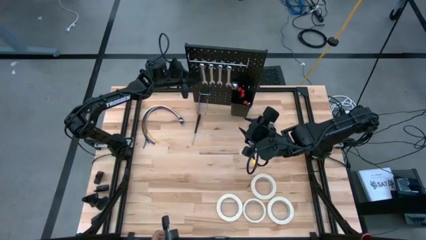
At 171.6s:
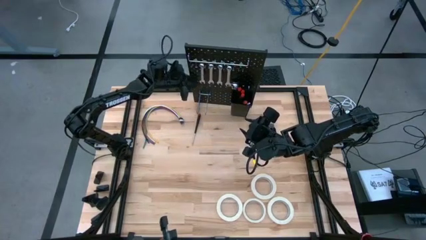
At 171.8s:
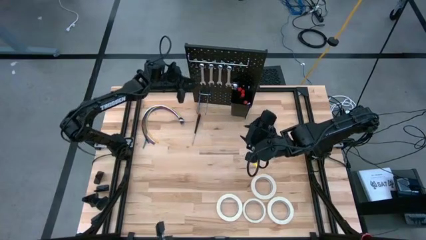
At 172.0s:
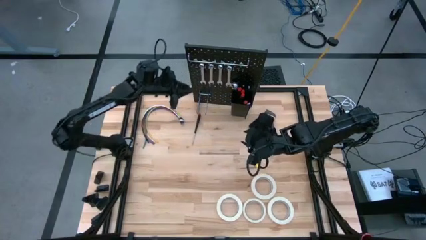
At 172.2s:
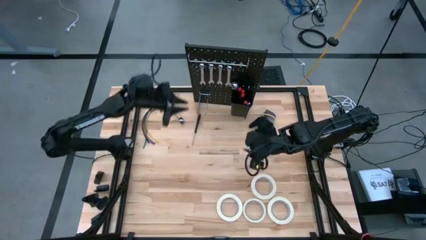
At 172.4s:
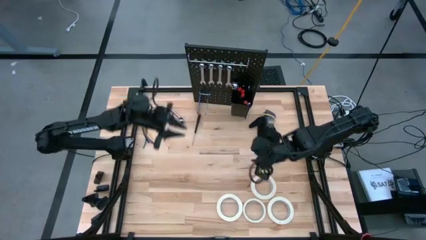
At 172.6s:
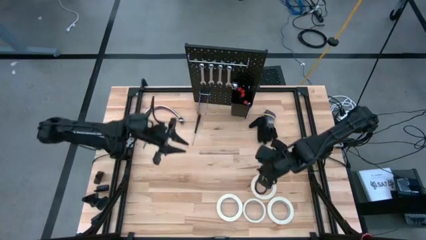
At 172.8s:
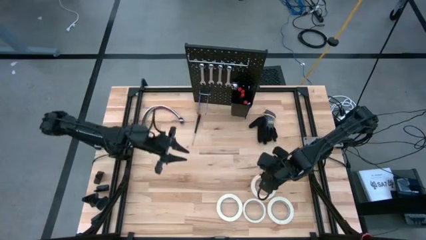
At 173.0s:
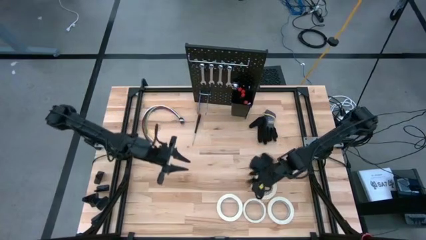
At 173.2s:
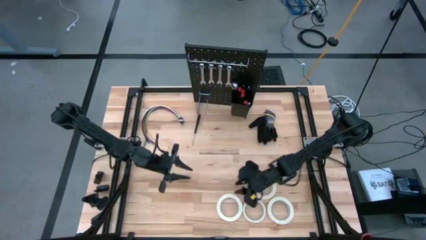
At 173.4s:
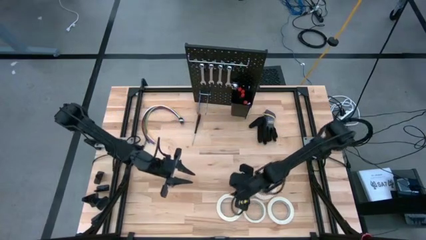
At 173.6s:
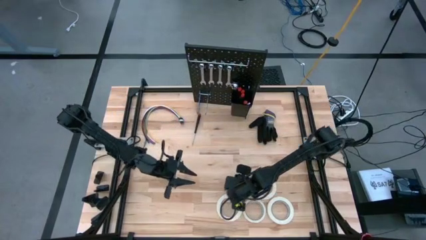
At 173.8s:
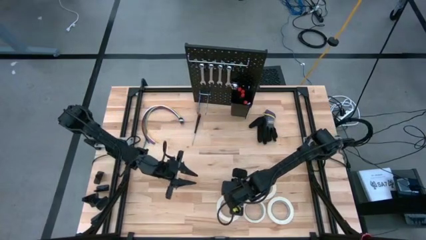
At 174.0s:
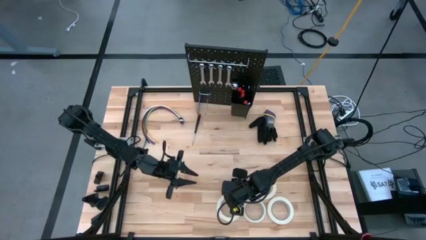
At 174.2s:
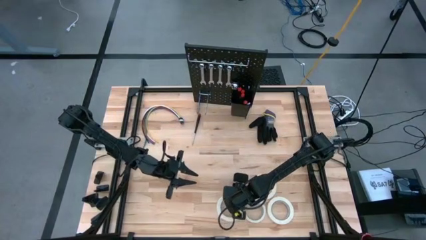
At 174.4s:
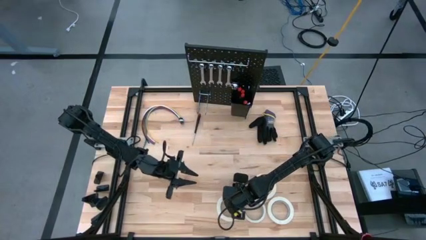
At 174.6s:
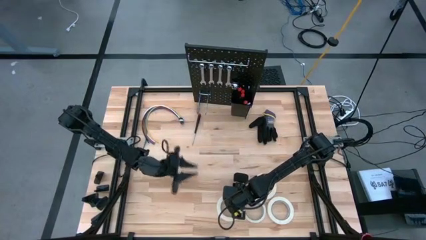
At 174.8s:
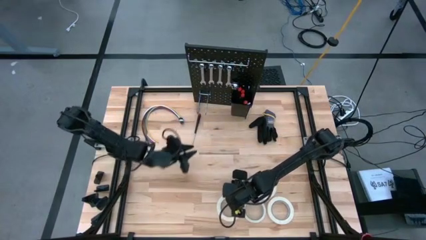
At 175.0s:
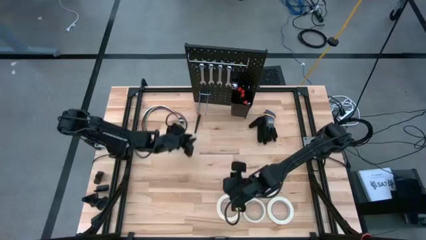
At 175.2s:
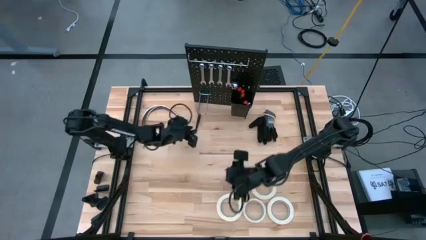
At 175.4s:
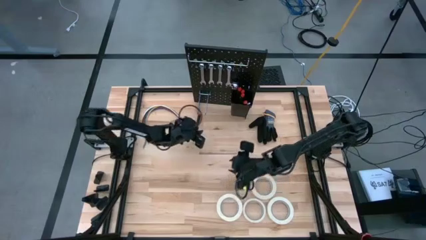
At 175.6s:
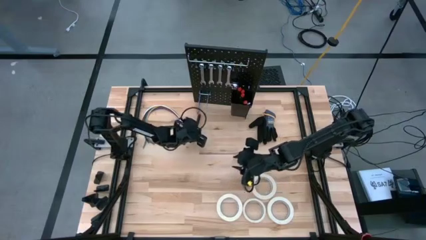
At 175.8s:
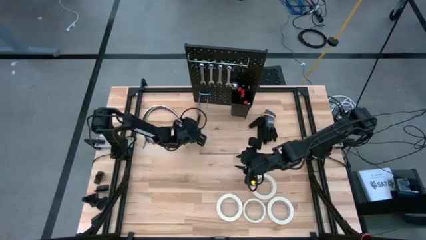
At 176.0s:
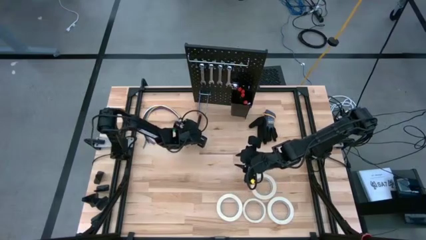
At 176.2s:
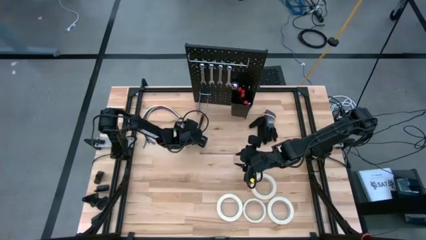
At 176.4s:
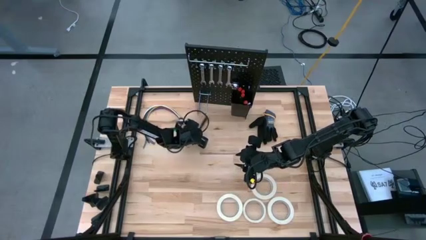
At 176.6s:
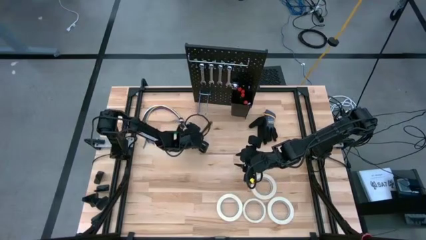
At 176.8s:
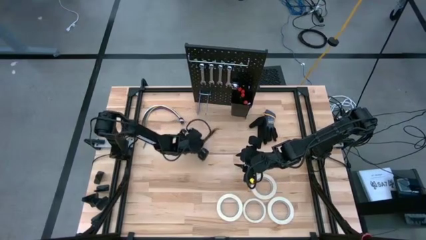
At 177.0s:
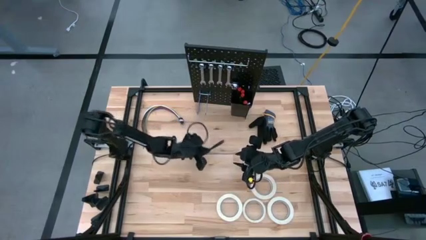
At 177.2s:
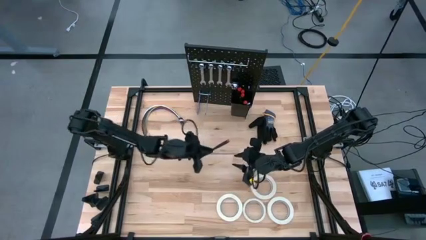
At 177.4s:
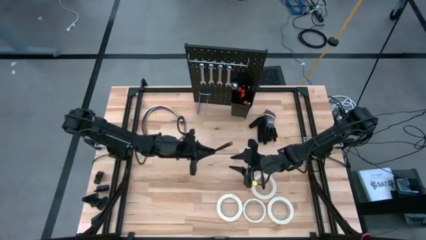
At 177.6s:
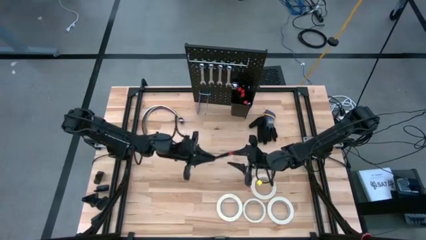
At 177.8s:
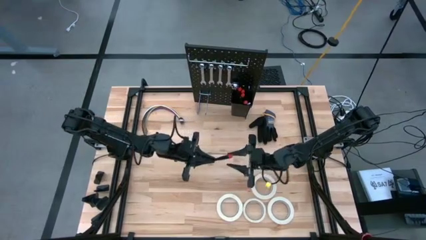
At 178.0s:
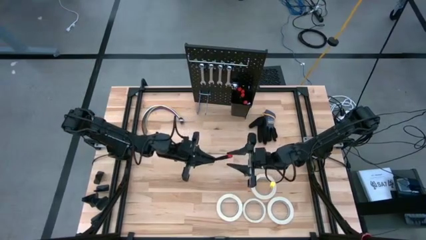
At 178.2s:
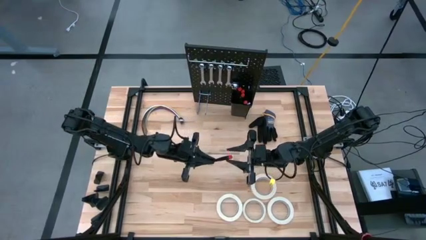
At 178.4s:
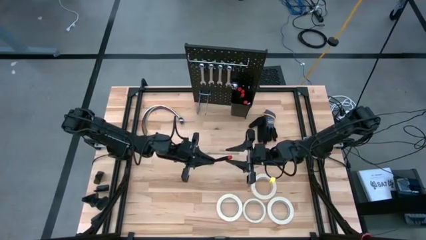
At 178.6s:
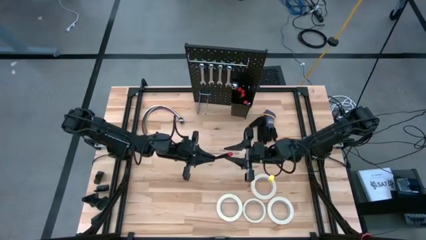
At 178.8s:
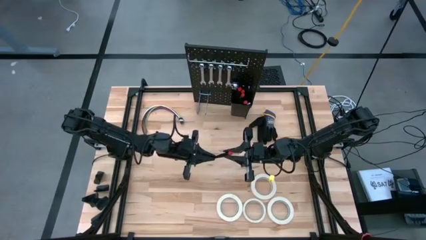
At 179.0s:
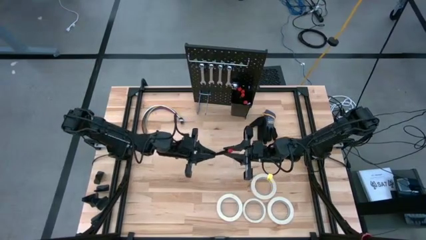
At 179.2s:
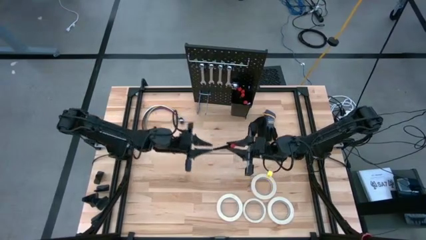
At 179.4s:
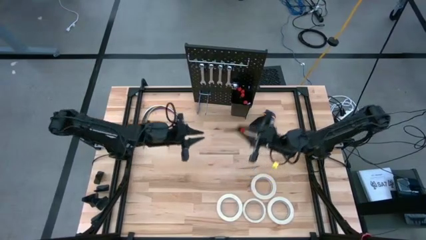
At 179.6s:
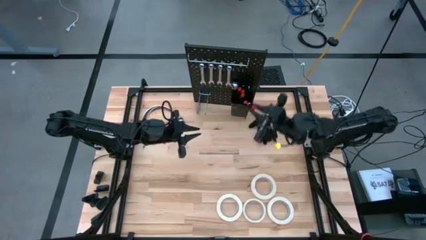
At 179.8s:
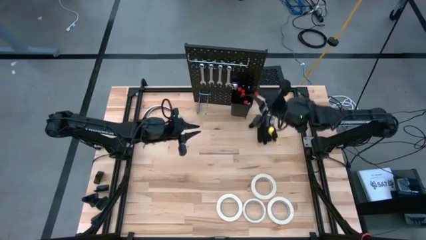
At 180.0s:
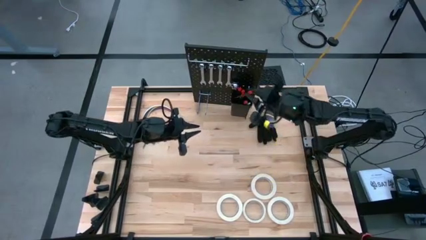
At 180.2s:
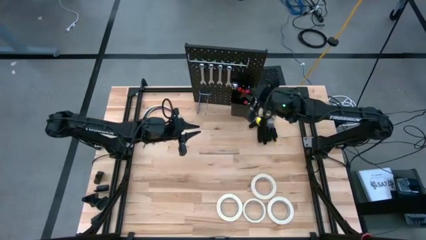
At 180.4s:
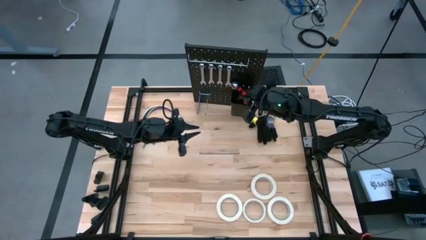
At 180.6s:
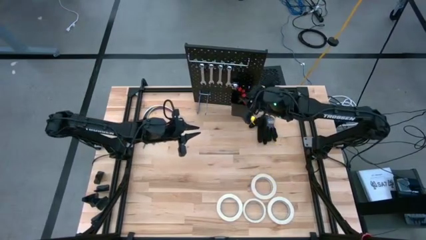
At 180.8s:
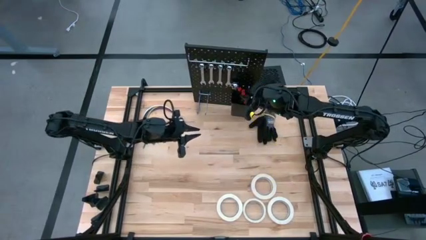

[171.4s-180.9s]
Task: Hang tools onto peg board
Put the black nut driver into the black bin on the peg board

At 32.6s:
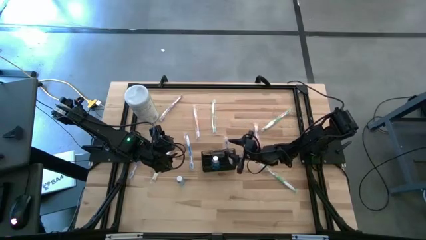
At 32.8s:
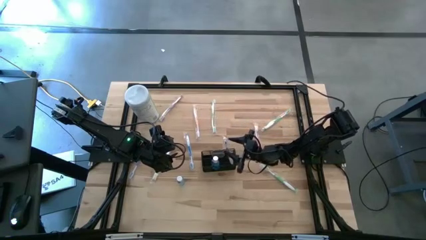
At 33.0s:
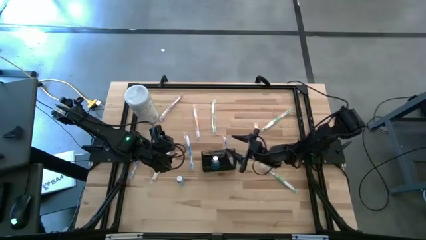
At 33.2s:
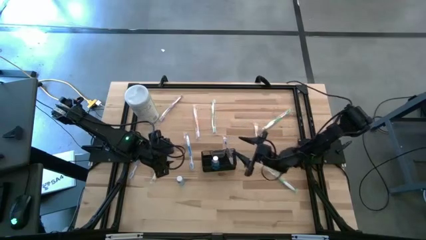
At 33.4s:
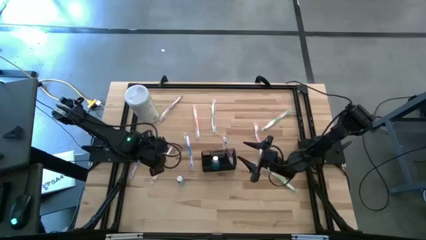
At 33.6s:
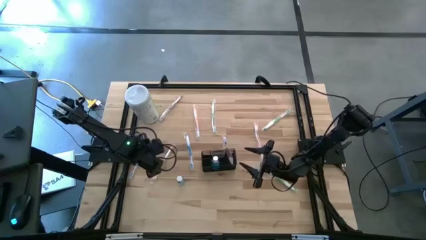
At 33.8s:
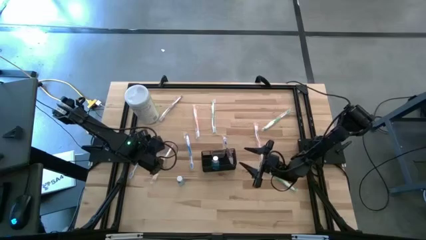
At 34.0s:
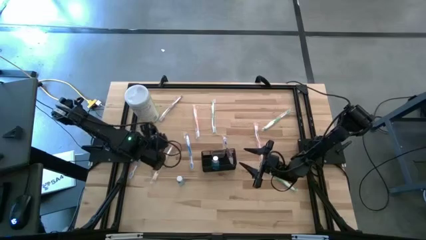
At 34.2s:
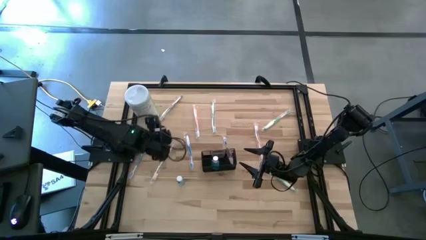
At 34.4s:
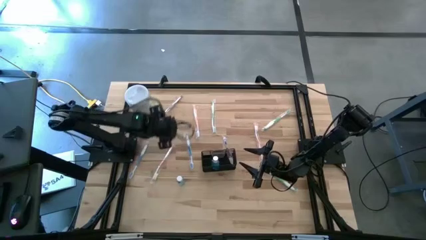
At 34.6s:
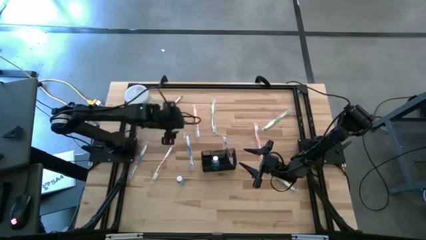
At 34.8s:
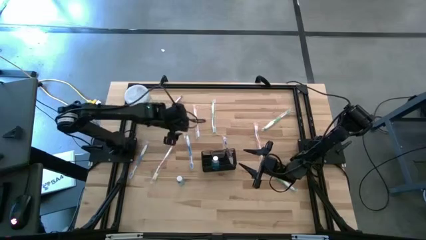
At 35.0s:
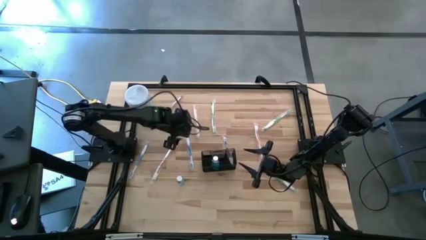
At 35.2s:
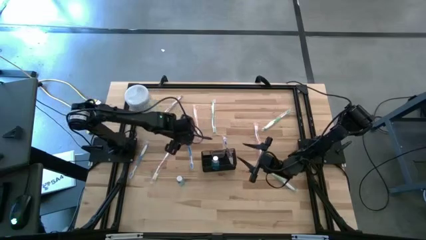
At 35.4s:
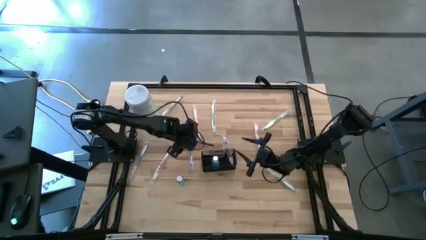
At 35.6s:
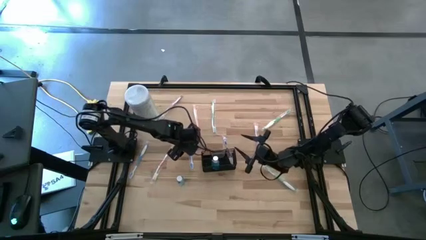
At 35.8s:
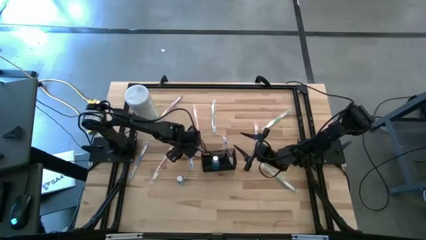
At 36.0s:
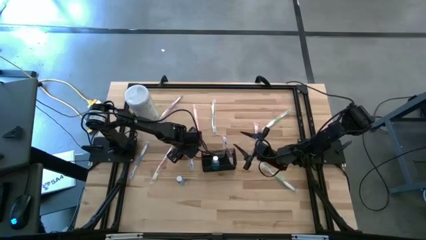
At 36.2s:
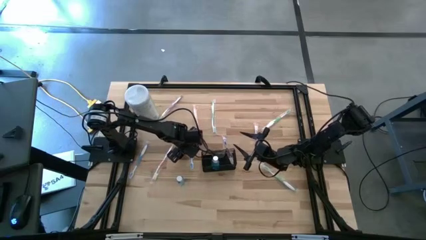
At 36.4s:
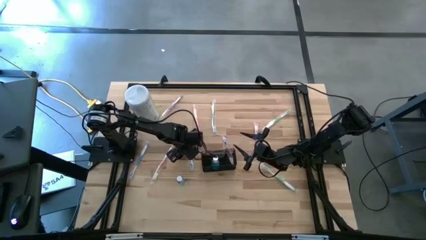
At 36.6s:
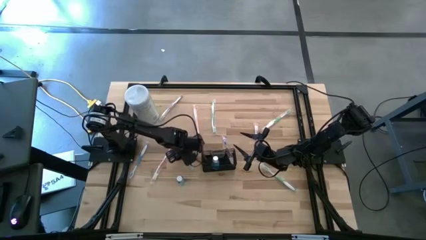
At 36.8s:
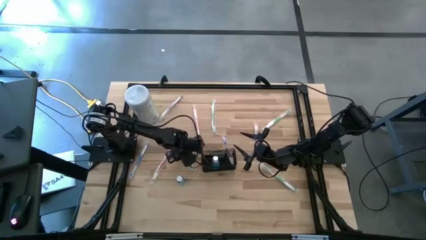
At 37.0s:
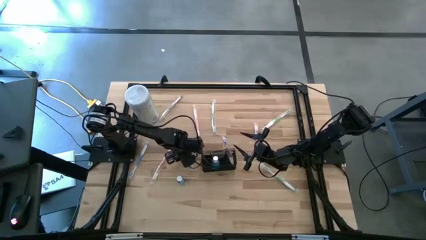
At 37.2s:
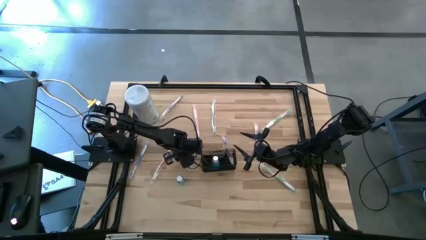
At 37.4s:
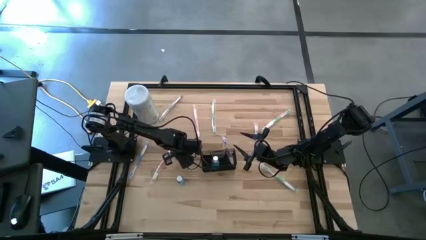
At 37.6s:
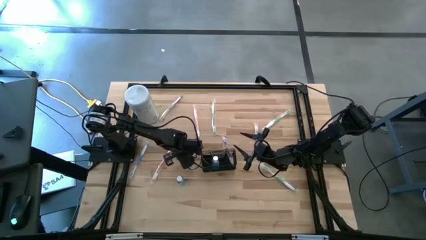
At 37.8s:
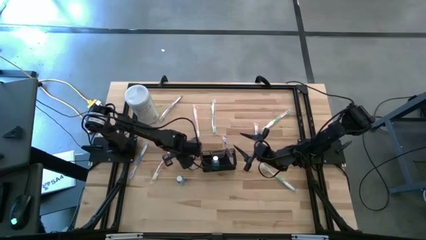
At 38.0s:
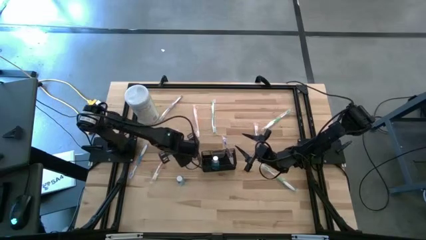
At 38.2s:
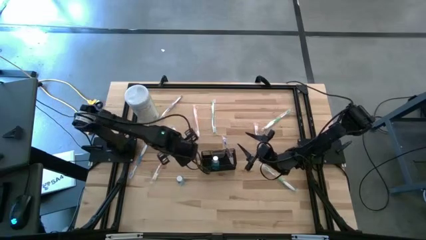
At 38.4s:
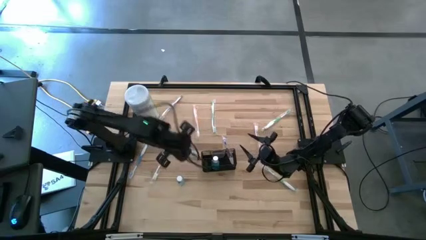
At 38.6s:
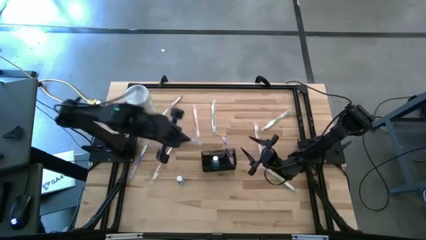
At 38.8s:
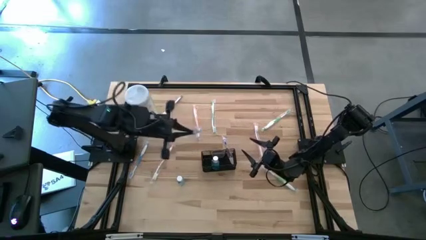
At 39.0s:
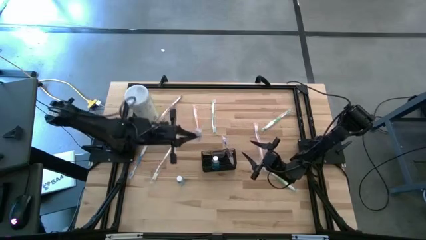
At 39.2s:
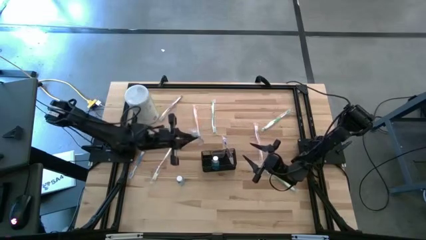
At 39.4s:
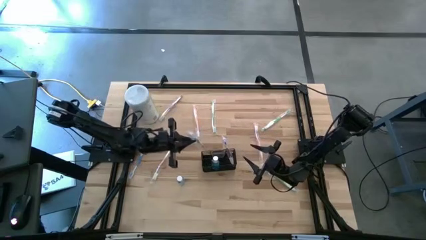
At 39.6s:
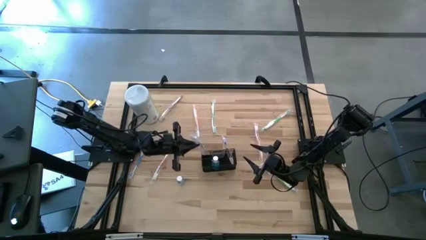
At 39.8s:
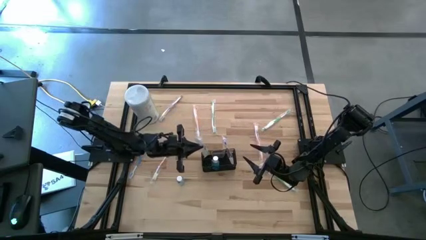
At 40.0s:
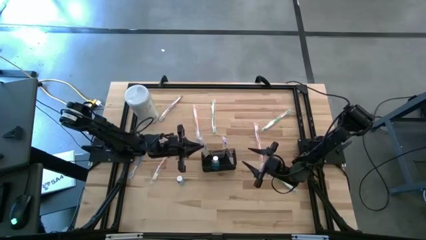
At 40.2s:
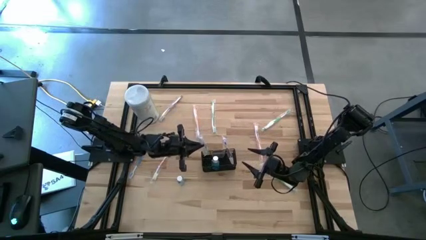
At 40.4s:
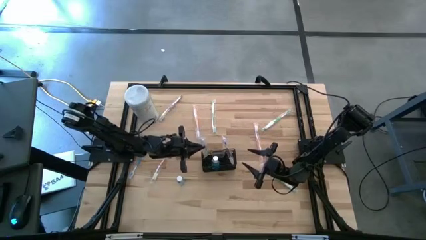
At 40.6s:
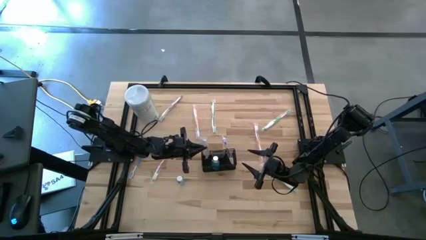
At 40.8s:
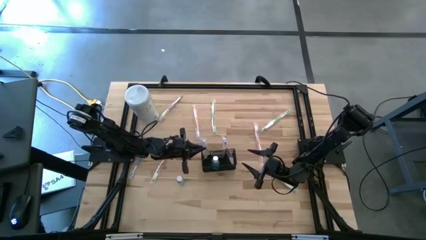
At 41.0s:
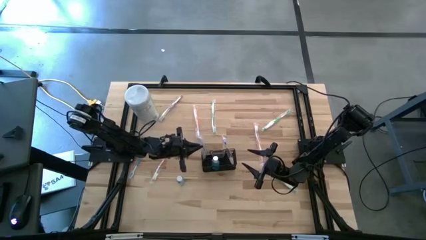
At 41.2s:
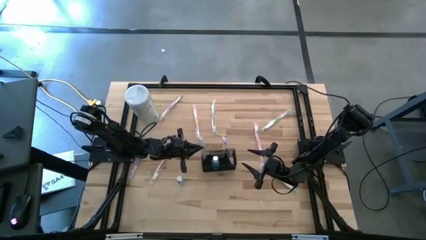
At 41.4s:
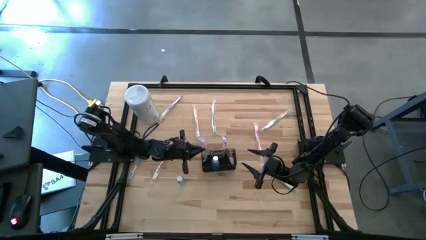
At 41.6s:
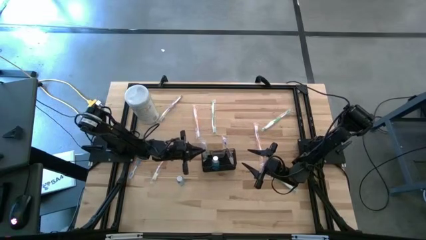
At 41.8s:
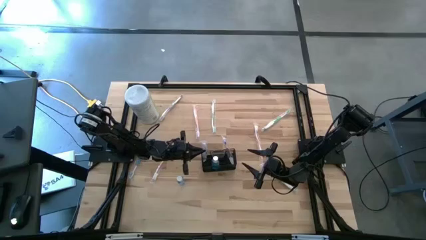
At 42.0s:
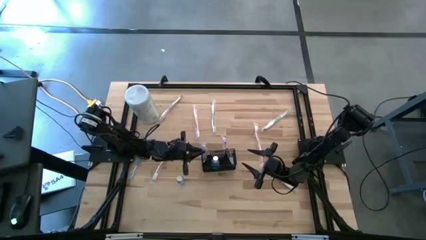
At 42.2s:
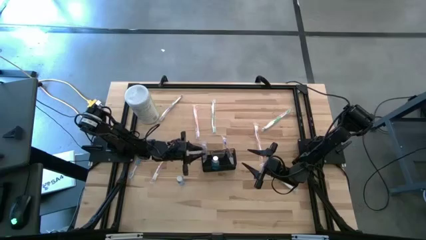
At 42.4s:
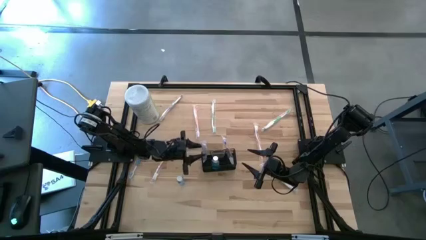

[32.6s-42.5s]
Task: Pick & Place toothbrushing station
Put the right blue toothbrush into the black wire organizer
